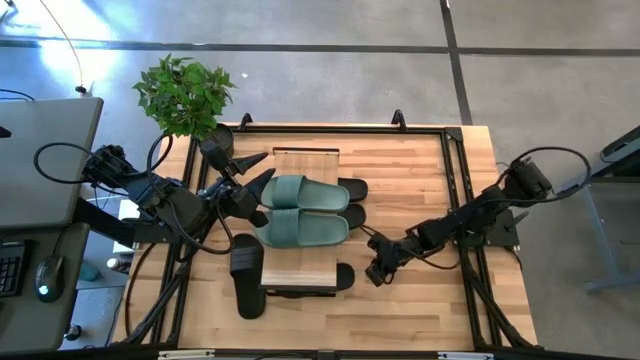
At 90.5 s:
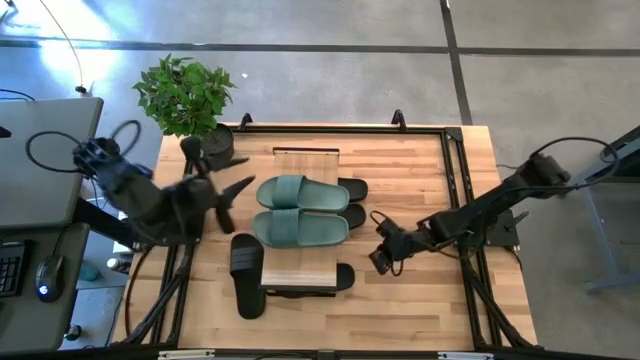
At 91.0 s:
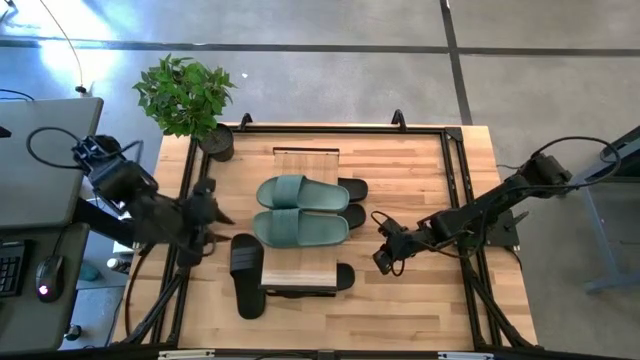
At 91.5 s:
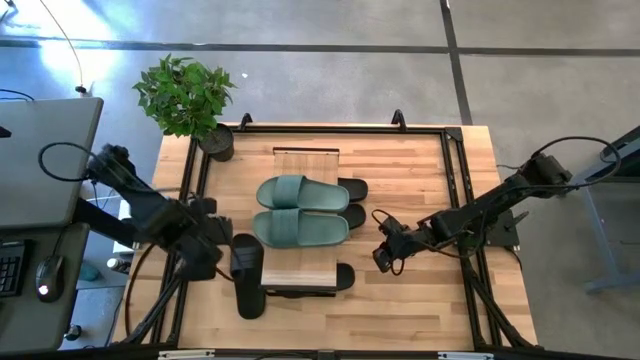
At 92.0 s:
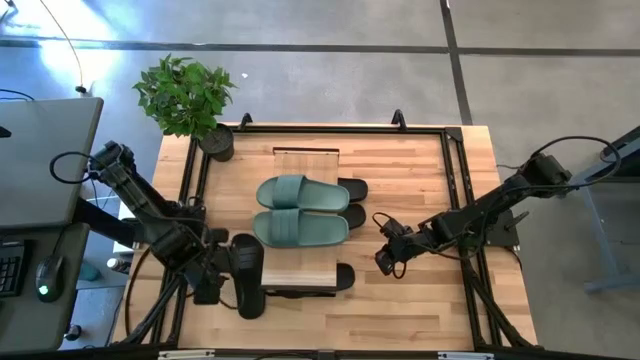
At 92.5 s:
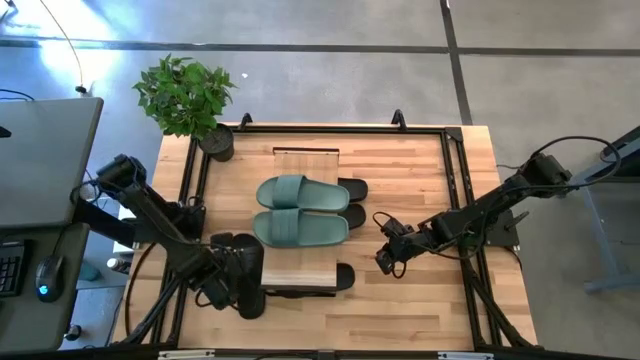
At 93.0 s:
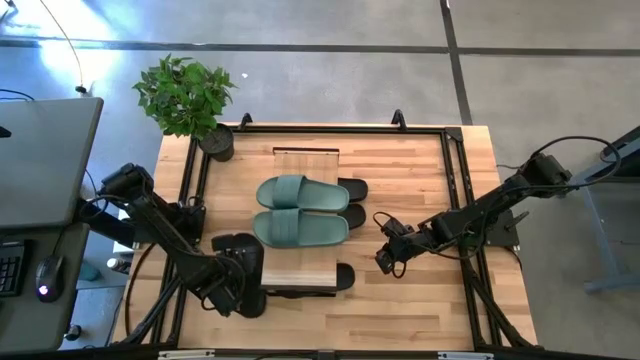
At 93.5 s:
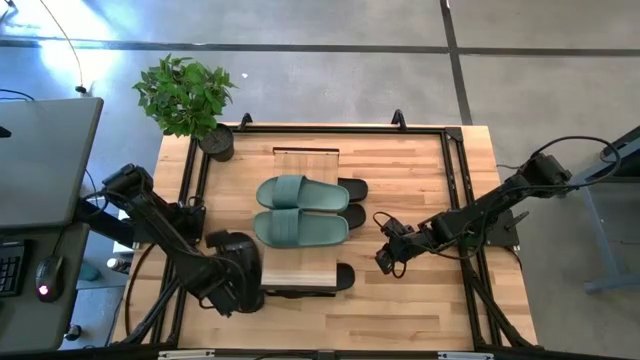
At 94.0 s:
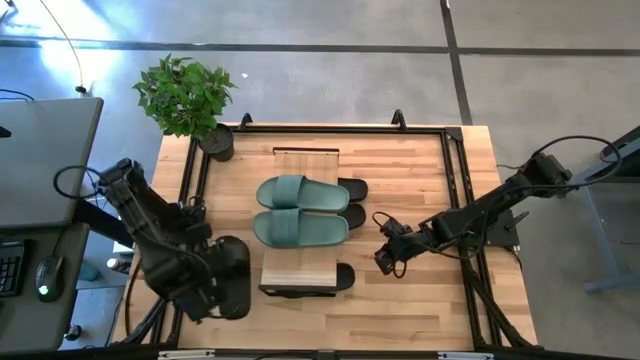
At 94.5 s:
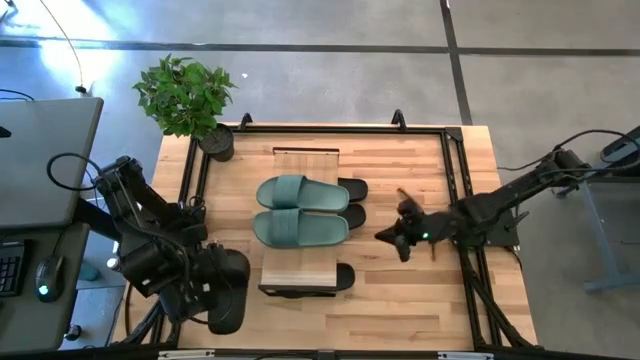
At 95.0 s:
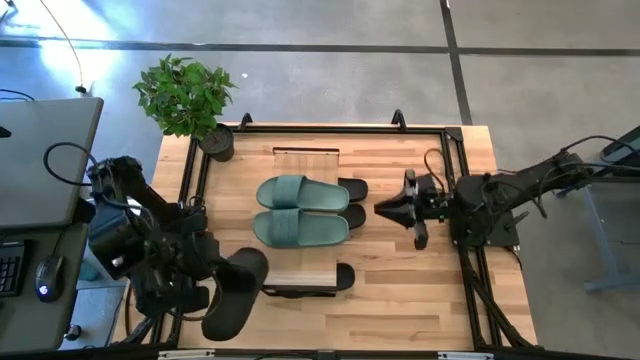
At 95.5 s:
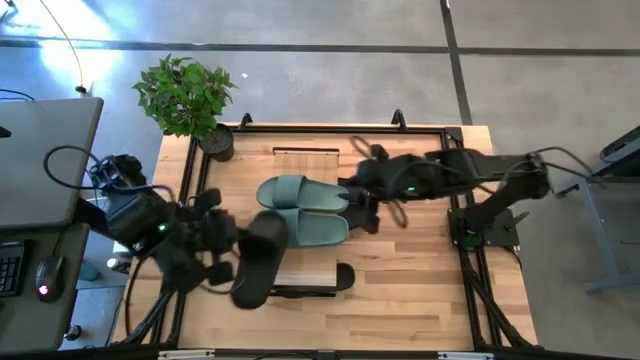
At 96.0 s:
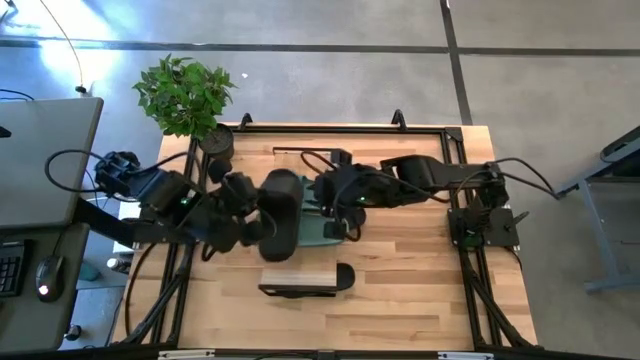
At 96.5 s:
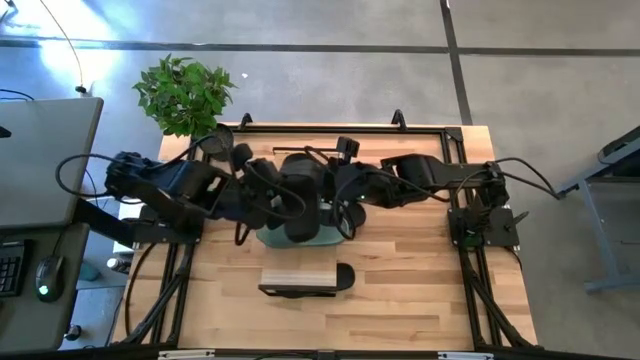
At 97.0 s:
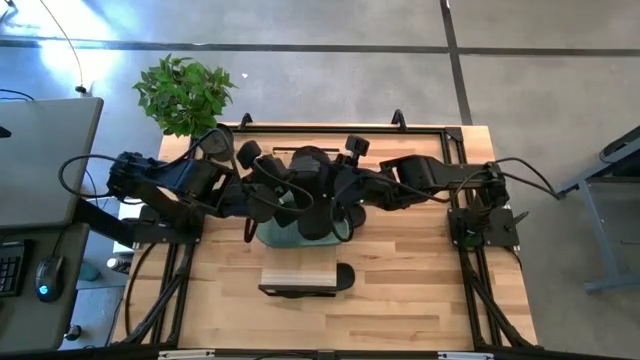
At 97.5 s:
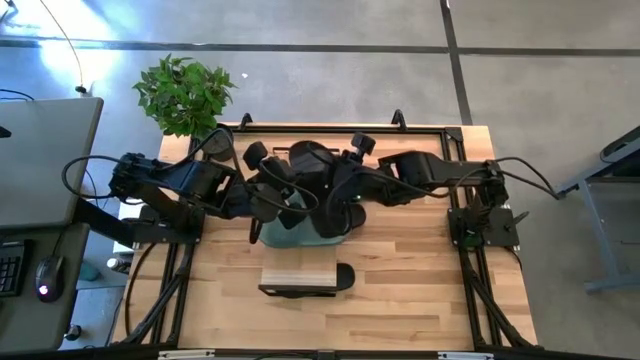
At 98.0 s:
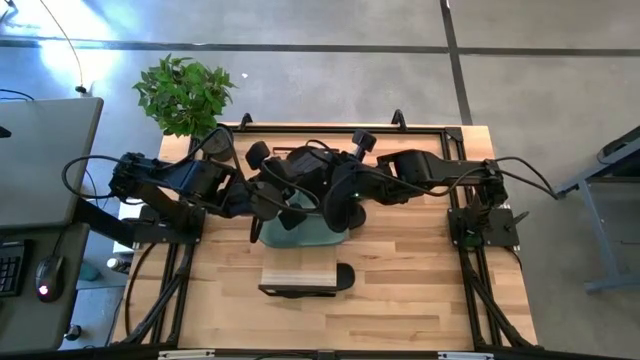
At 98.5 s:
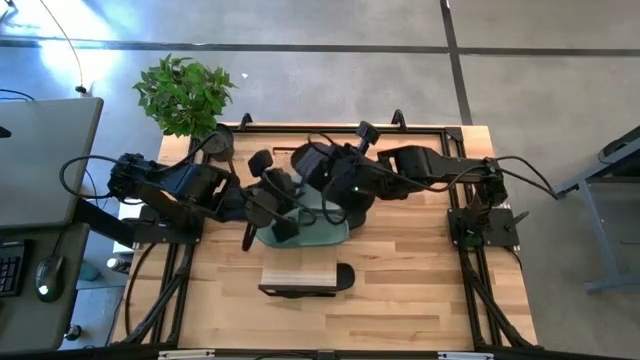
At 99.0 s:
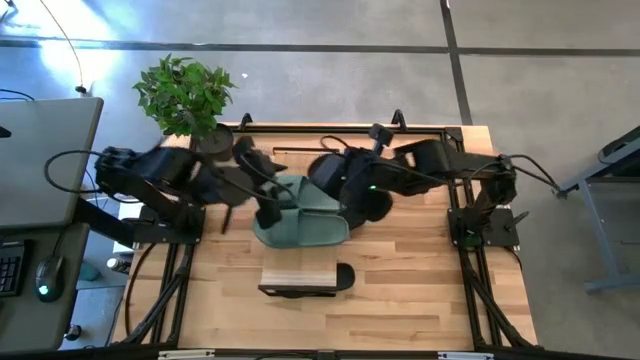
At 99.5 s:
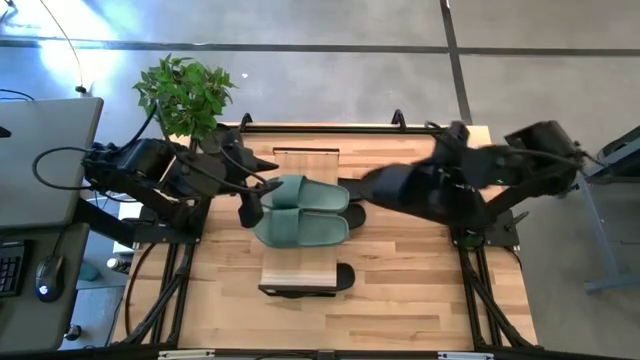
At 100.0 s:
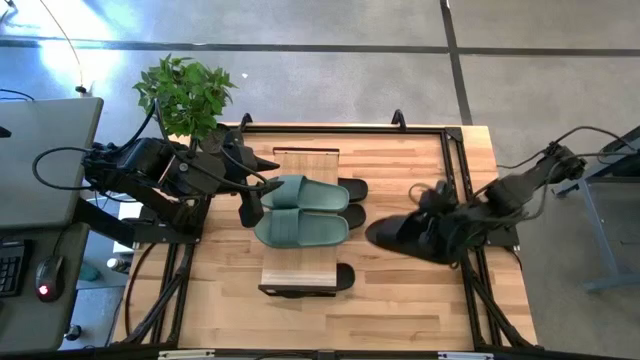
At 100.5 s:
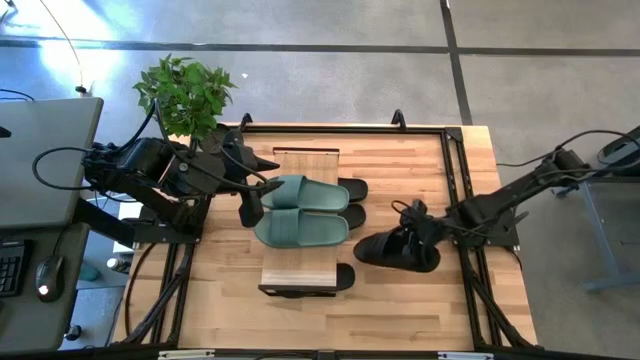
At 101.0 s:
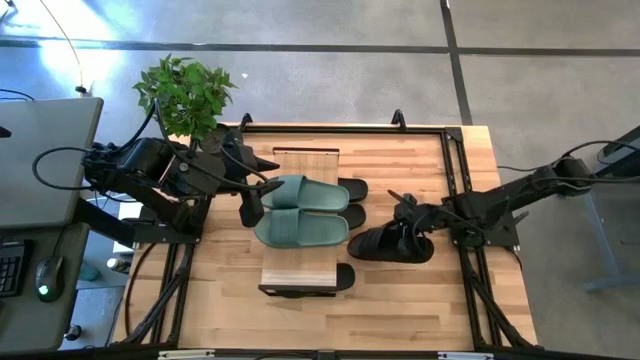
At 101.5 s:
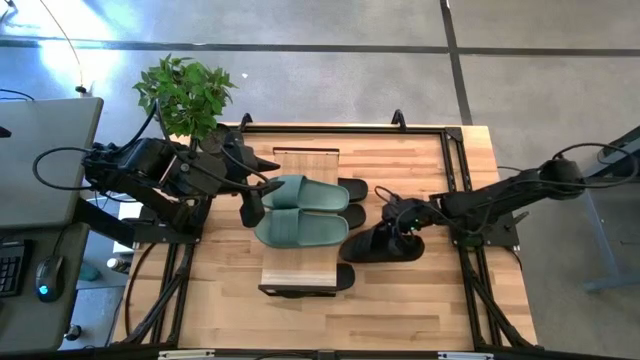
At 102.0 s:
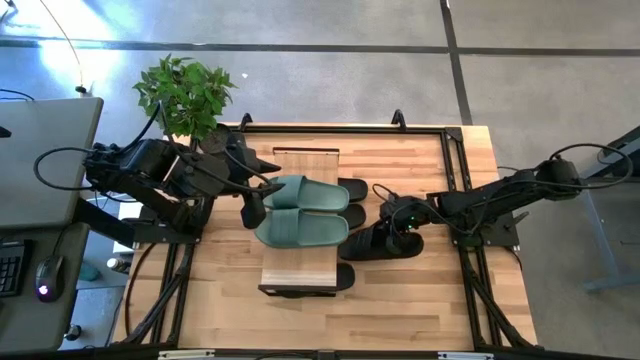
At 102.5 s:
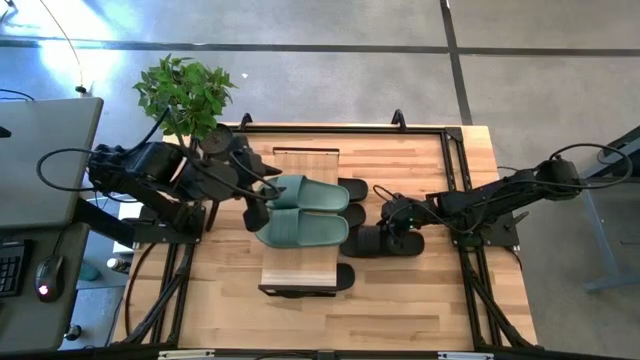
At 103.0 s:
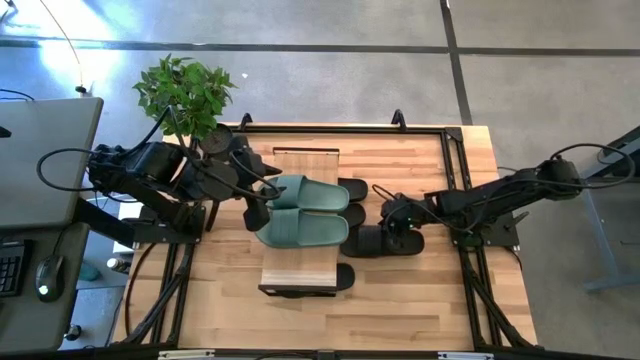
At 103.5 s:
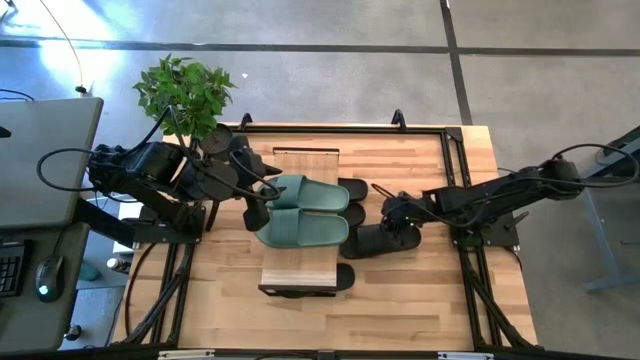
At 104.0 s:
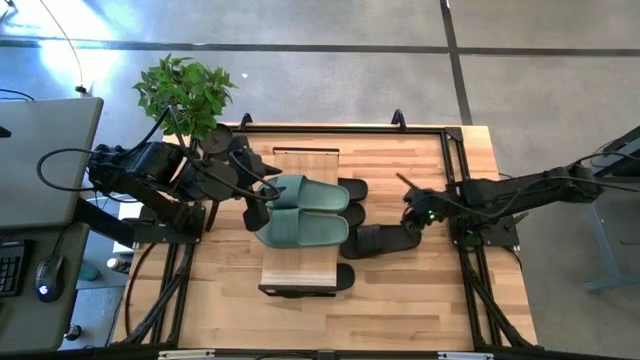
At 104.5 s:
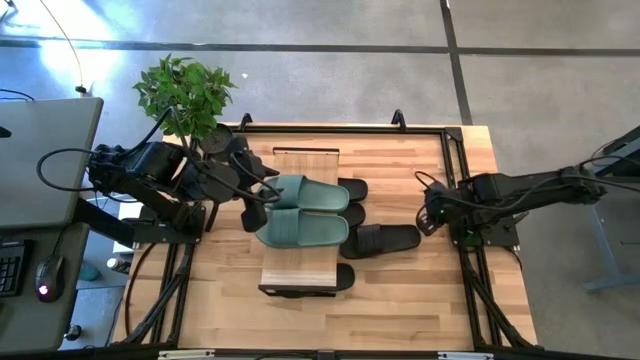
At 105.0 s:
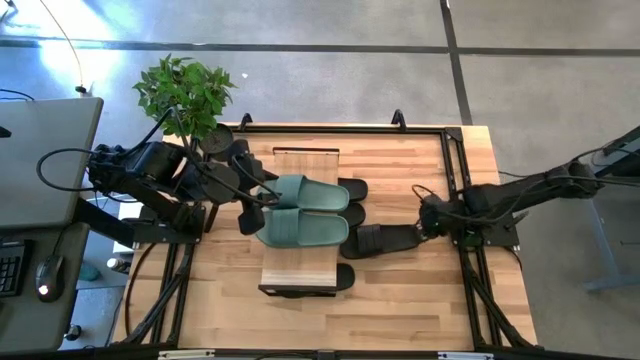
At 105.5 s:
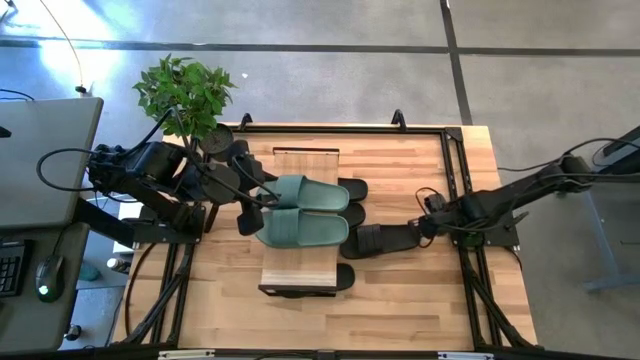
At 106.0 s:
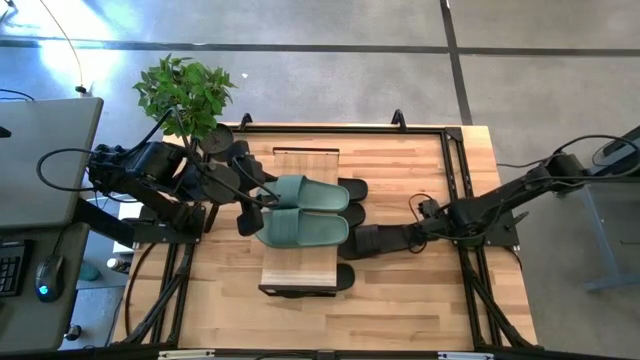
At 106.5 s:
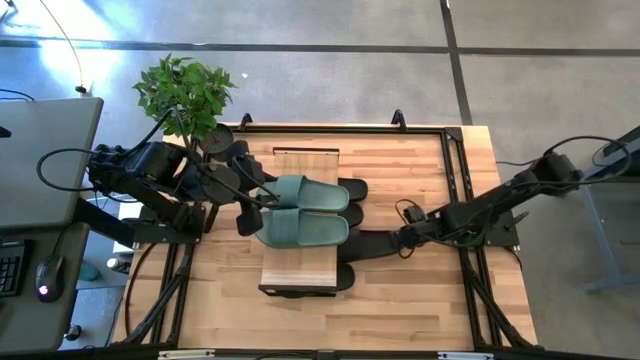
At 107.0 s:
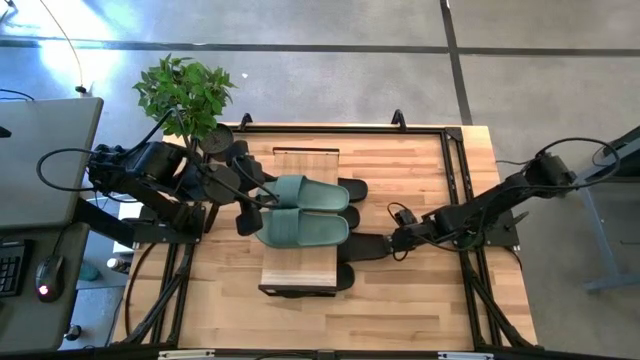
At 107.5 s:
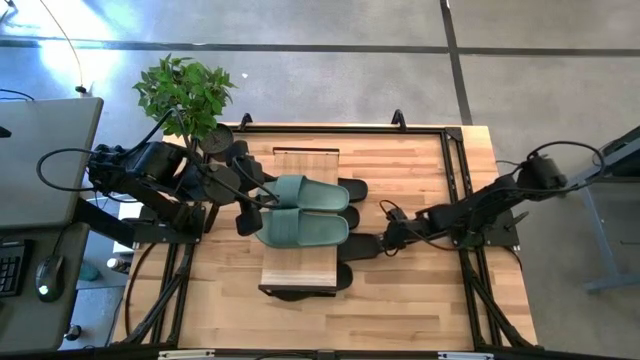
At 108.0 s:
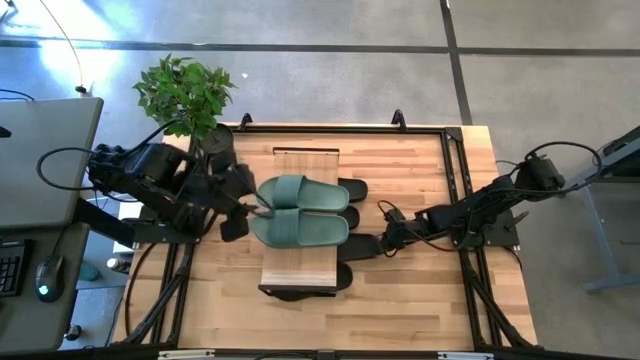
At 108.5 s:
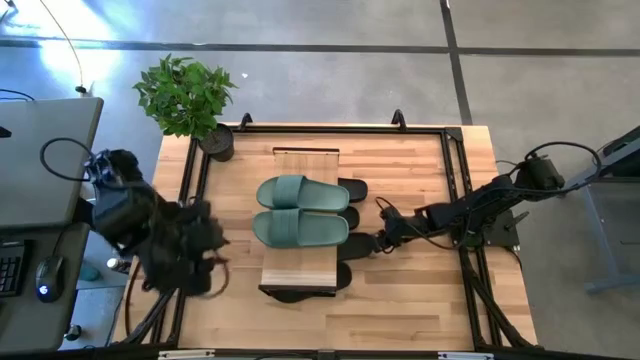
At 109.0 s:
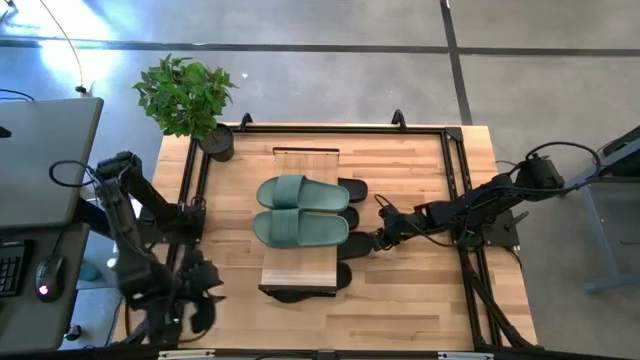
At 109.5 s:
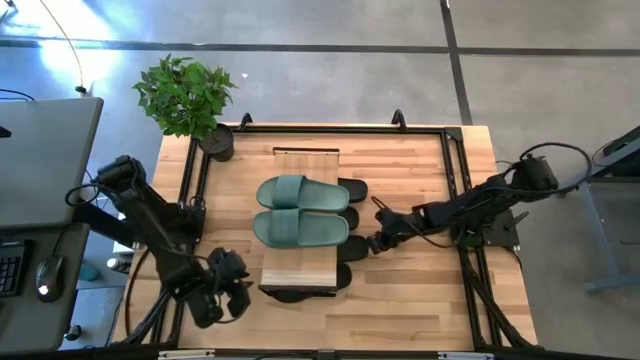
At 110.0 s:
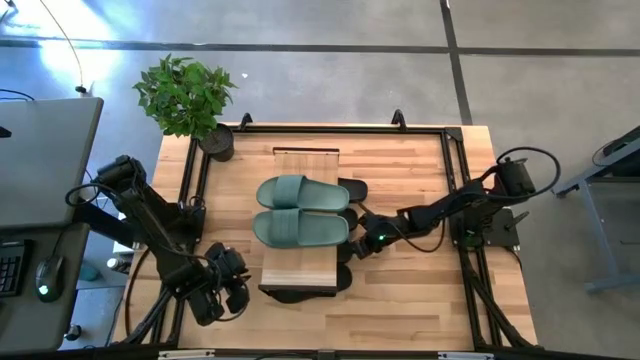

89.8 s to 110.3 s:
Task: Pick and place slides into the shelf
Put the black slipper under the shelf

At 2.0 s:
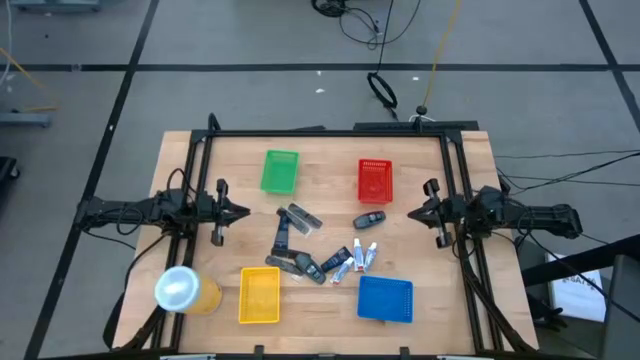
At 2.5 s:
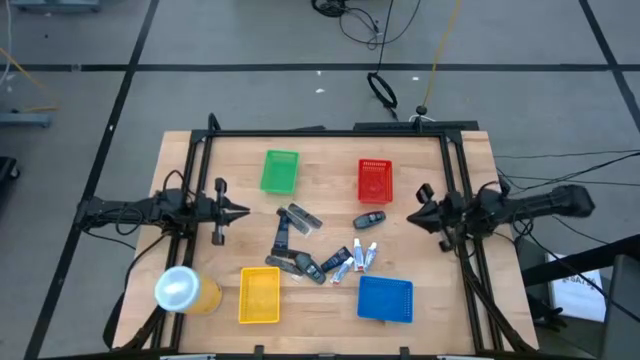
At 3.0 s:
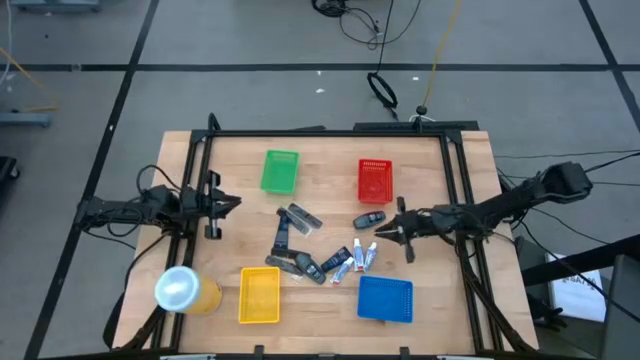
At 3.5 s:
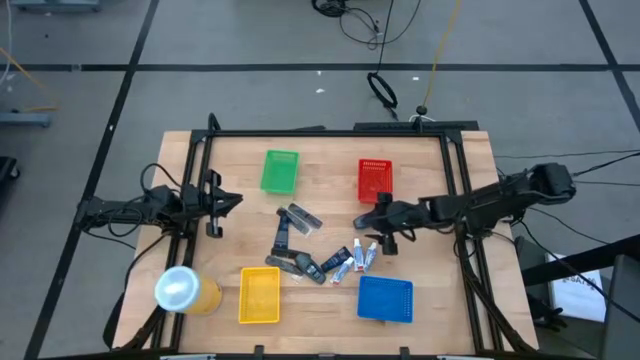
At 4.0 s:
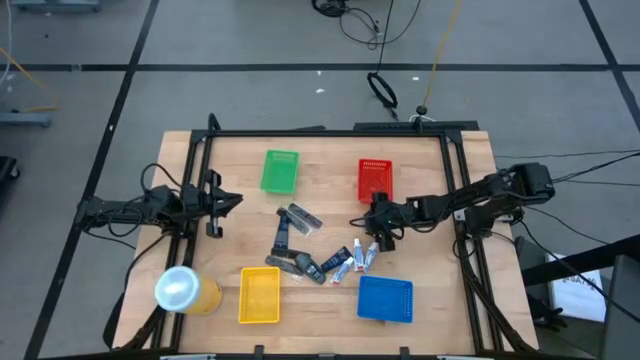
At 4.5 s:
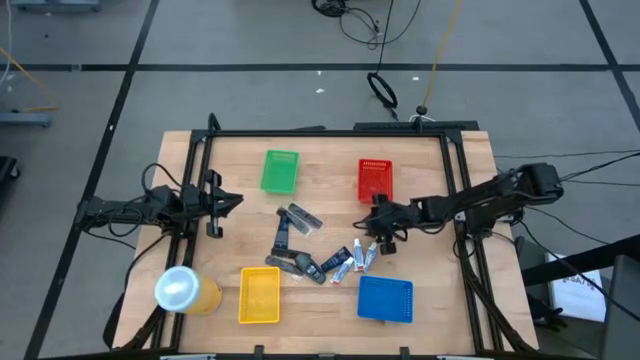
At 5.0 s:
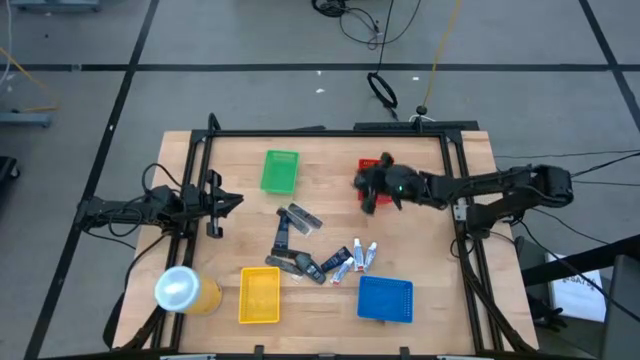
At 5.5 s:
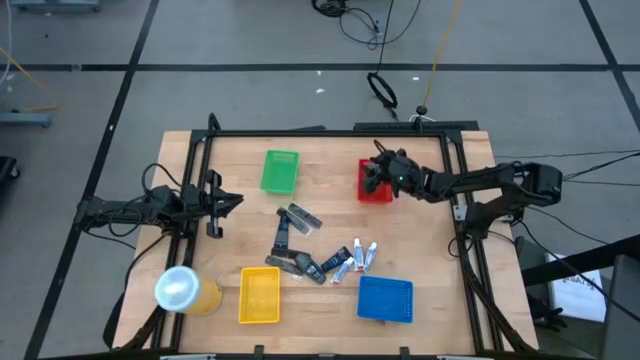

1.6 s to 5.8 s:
Task: Pick & Place Travel size toiletries
Put the right black roll on deodorant into the red bin
